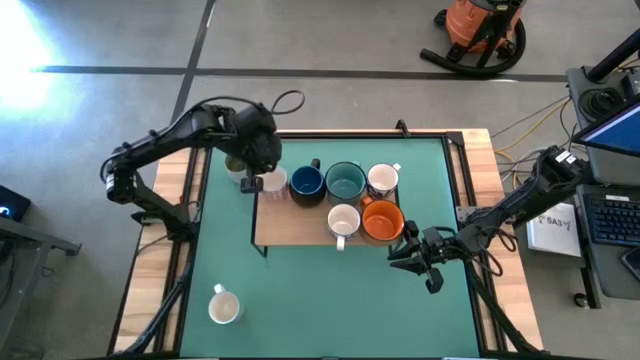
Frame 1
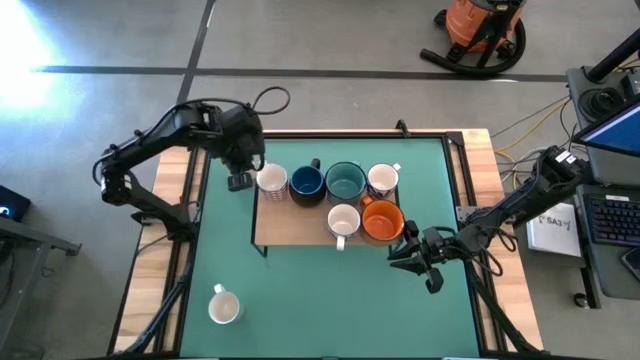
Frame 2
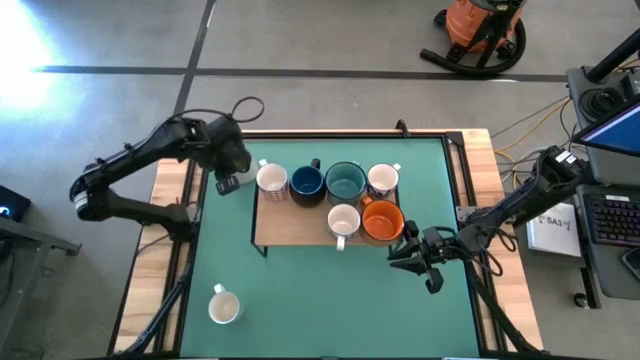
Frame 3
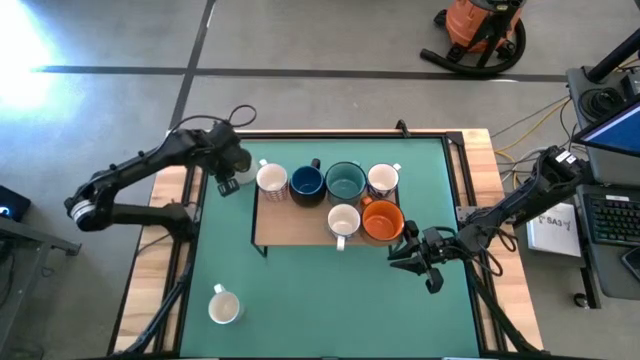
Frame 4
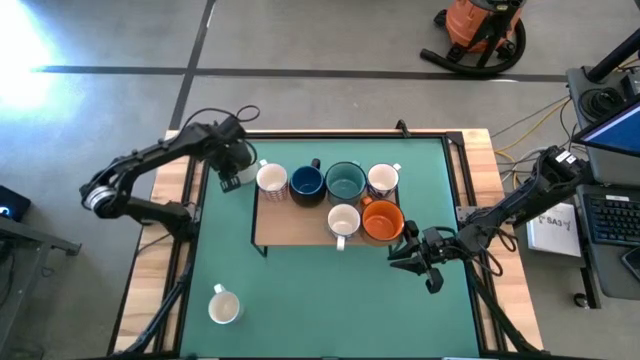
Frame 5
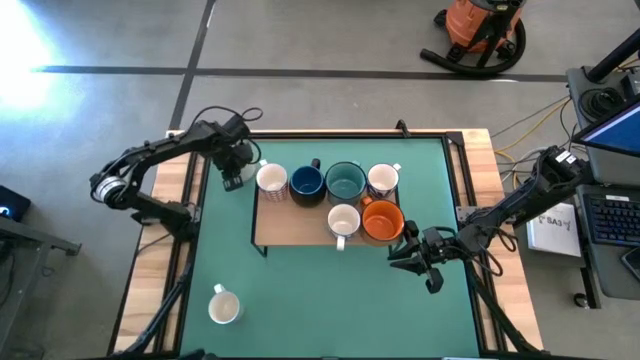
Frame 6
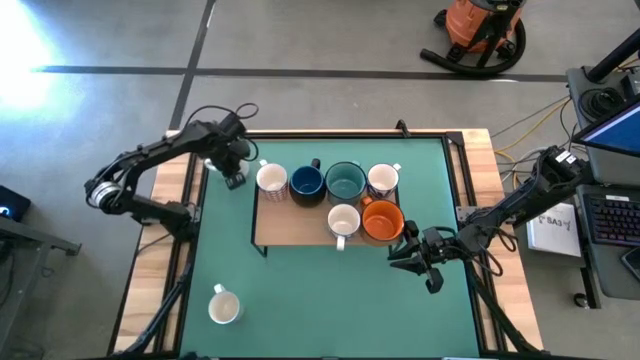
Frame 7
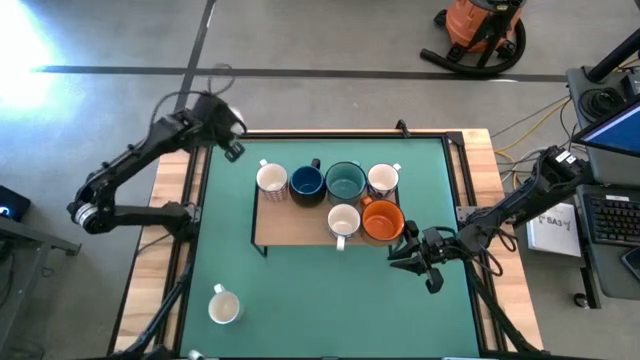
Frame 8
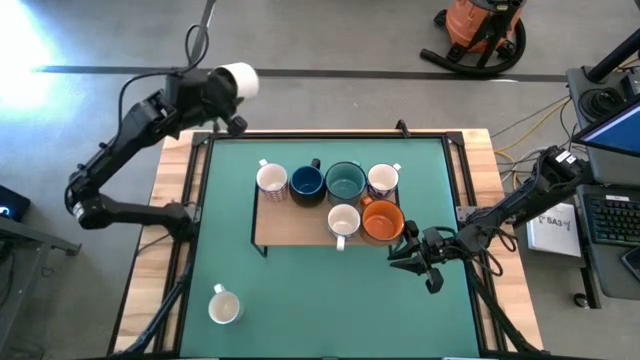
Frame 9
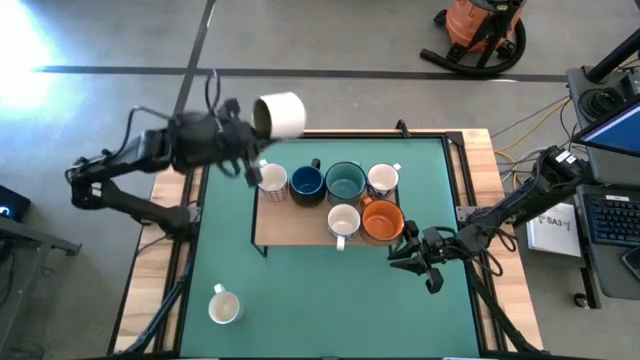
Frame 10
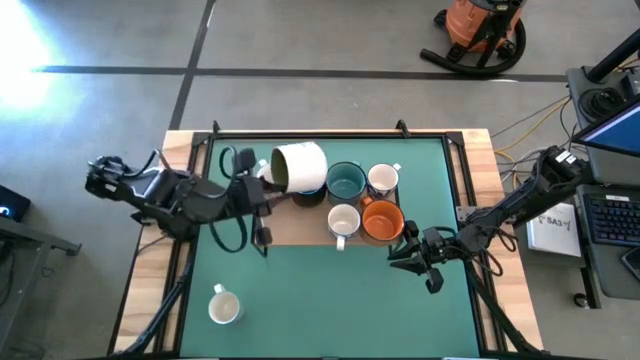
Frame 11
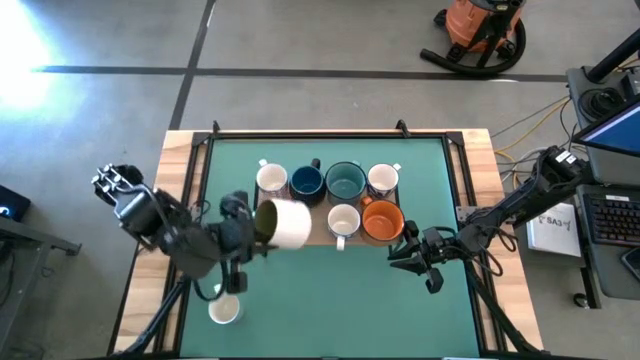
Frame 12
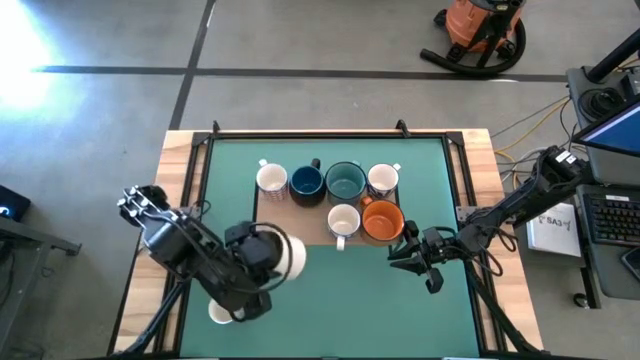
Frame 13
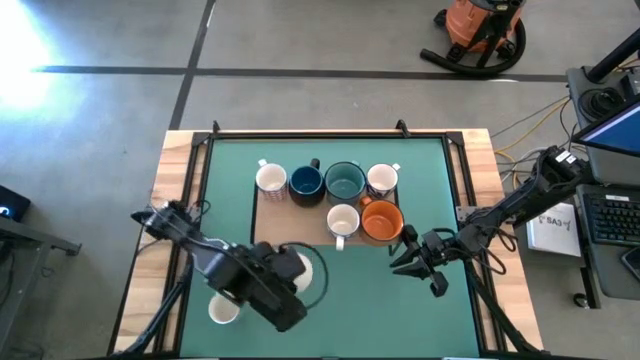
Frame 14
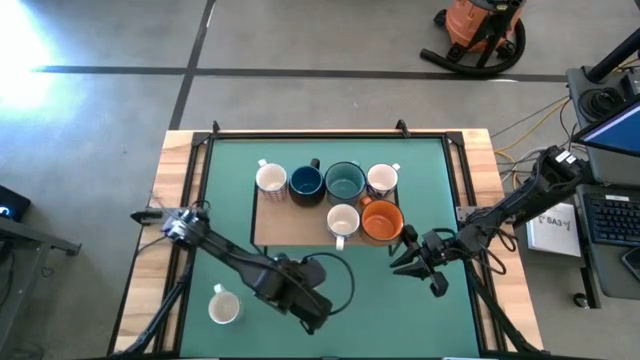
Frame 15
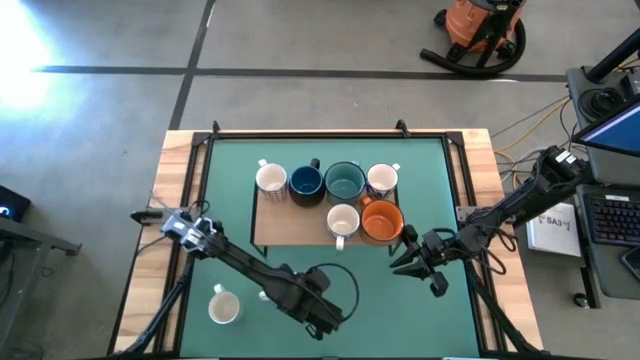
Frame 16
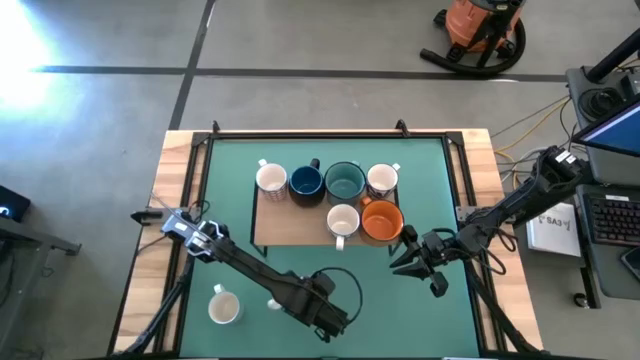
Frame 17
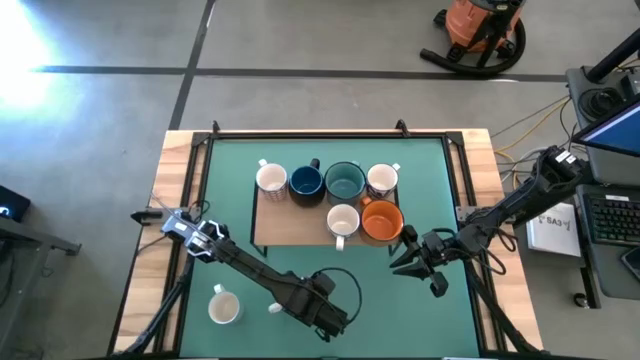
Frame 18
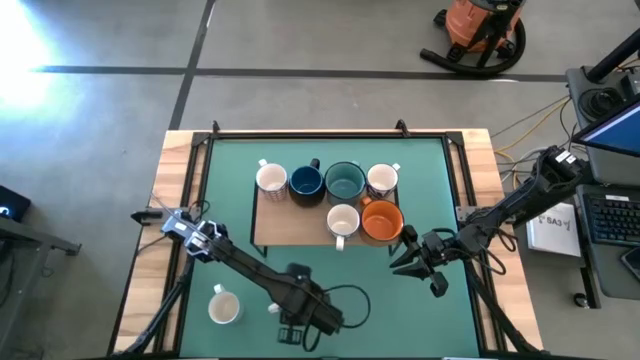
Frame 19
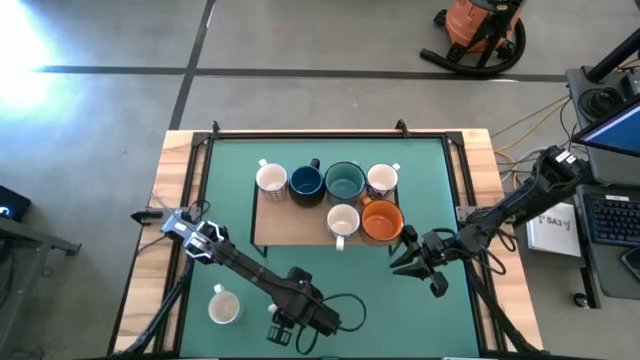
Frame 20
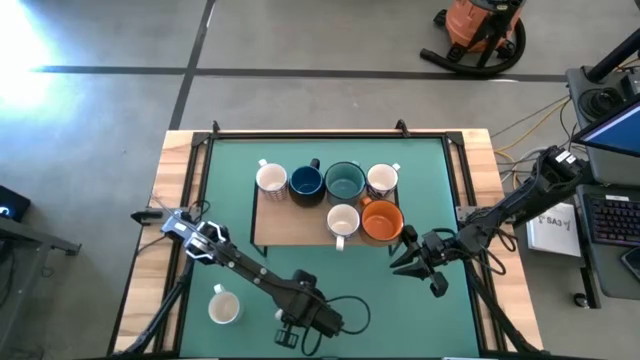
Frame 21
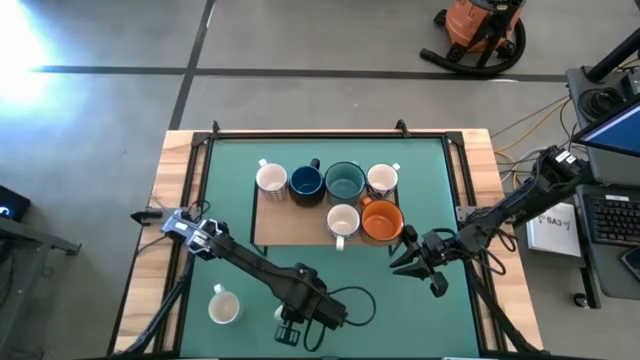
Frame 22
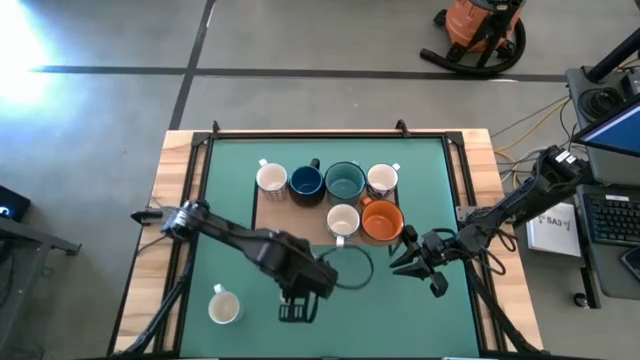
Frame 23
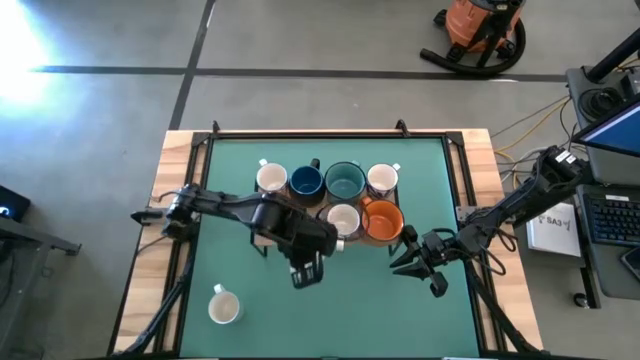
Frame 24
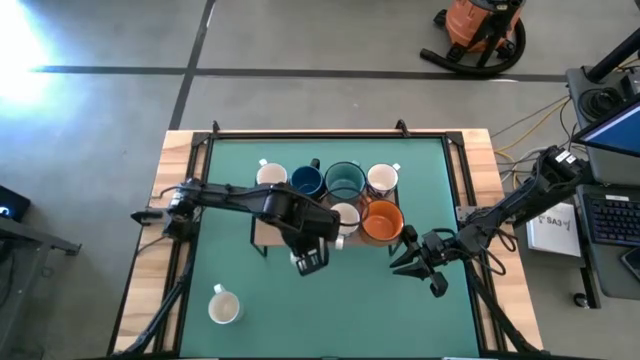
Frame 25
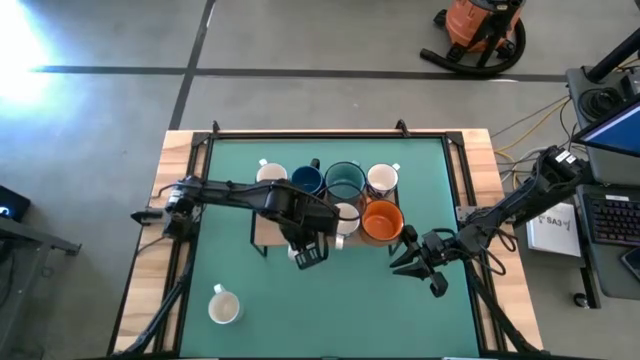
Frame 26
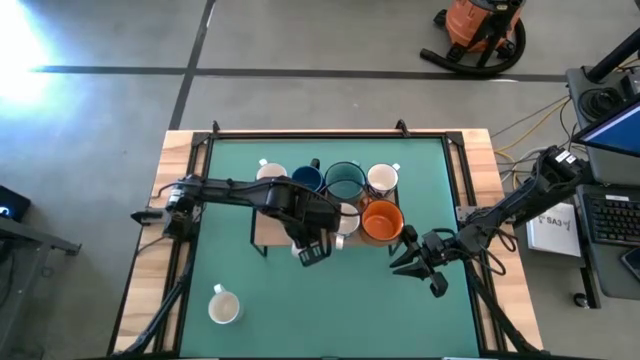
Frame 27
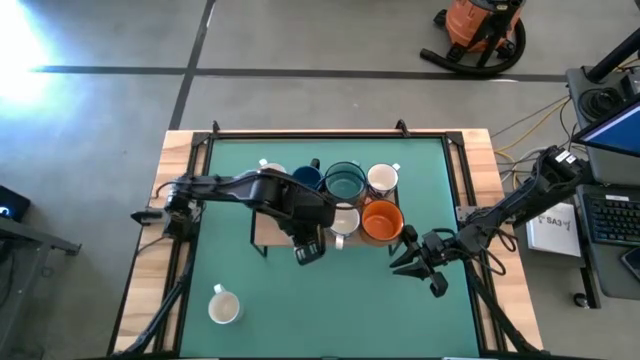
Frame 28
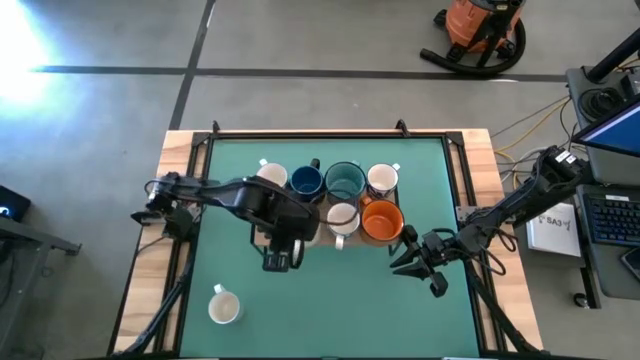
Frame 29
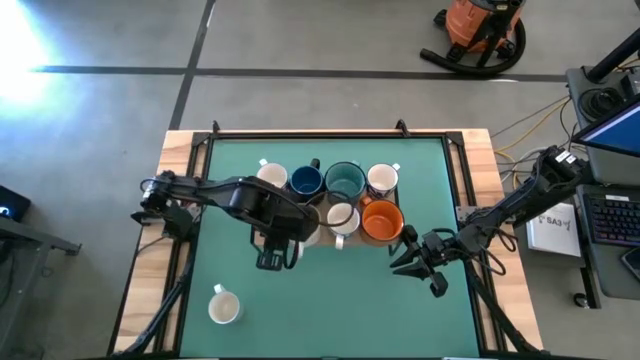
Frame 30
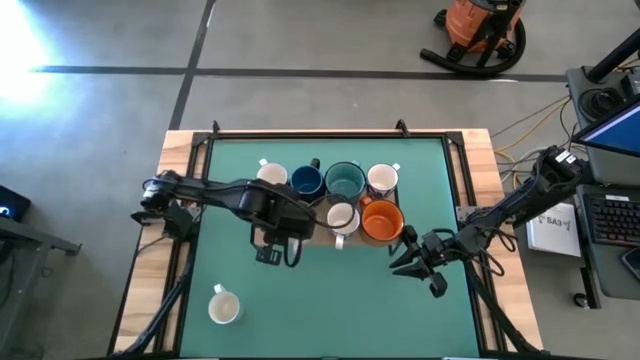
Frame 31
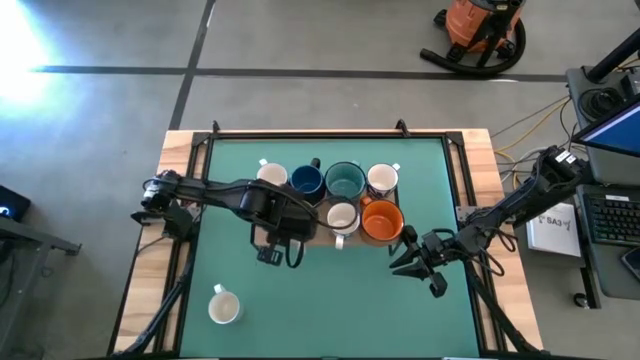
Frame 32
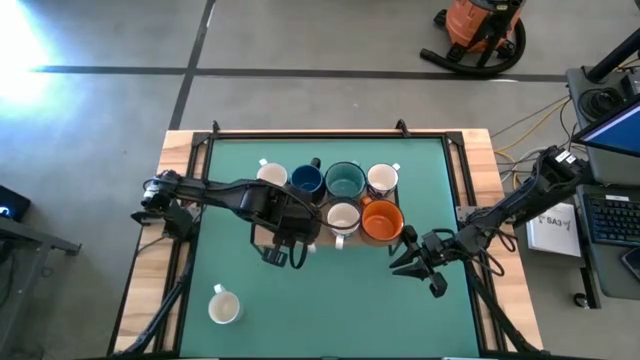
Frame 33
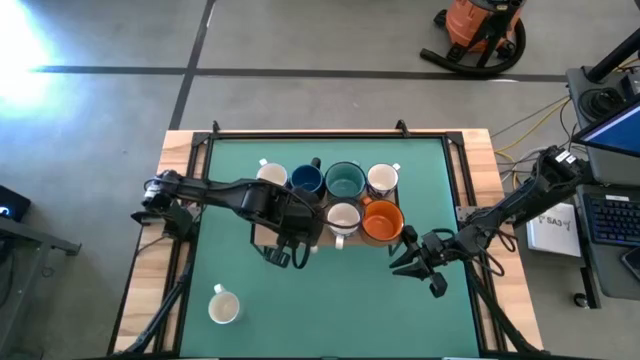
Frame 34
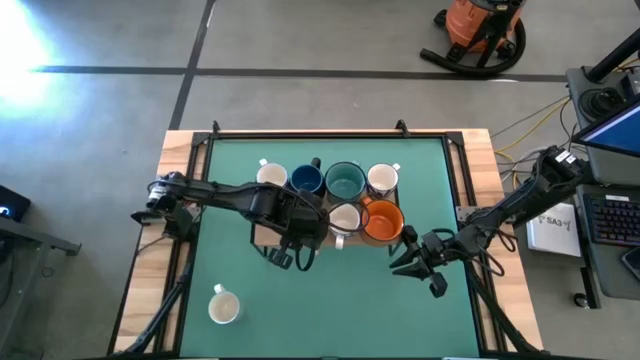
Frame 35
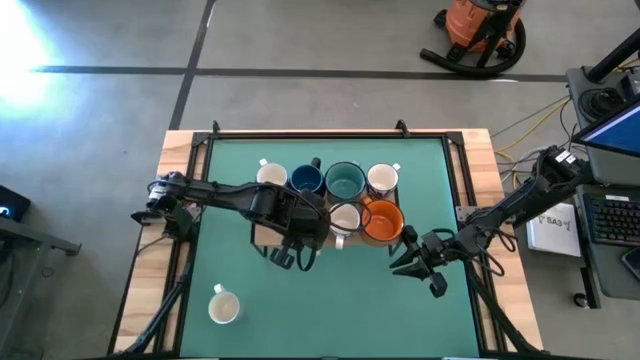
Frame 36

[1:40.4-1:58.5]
Task: Place coffee mugs
Put the white green mug on the shelf

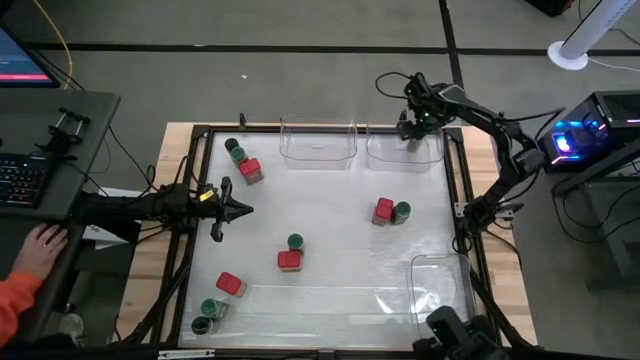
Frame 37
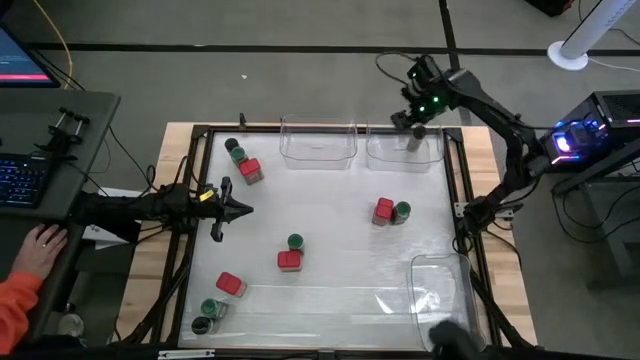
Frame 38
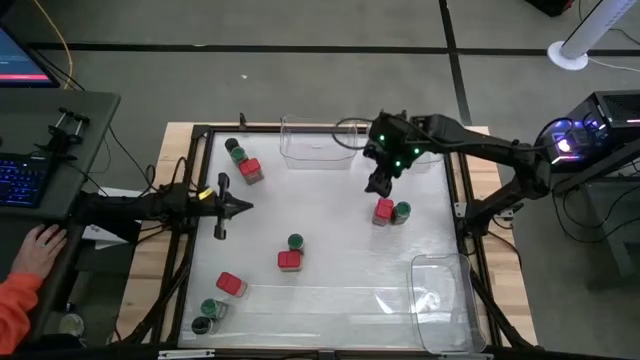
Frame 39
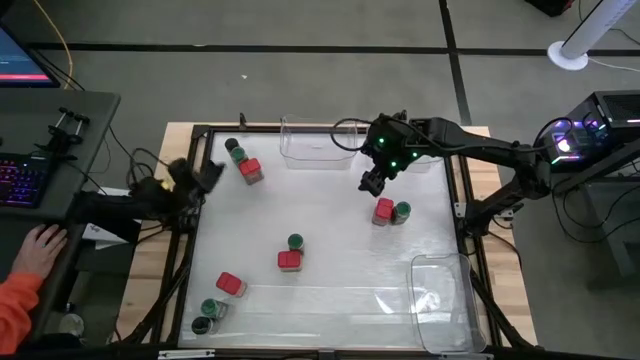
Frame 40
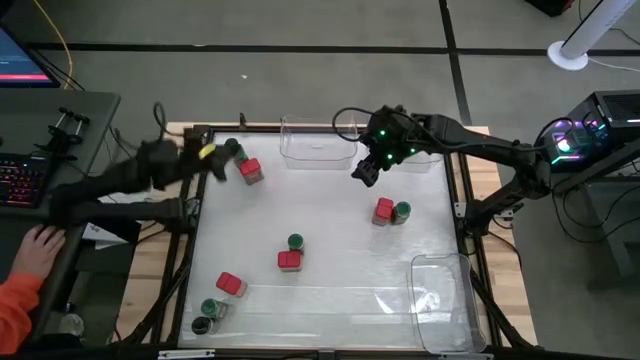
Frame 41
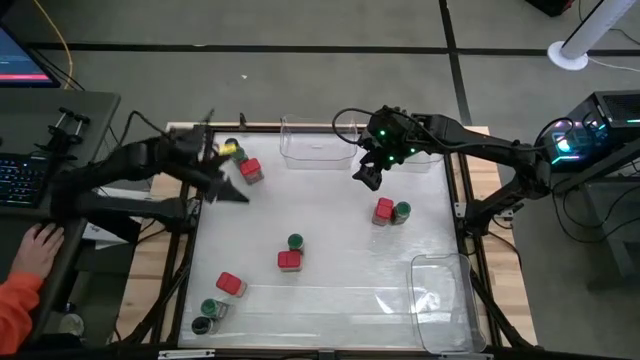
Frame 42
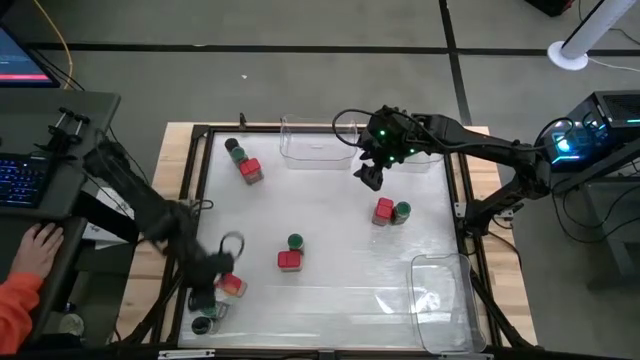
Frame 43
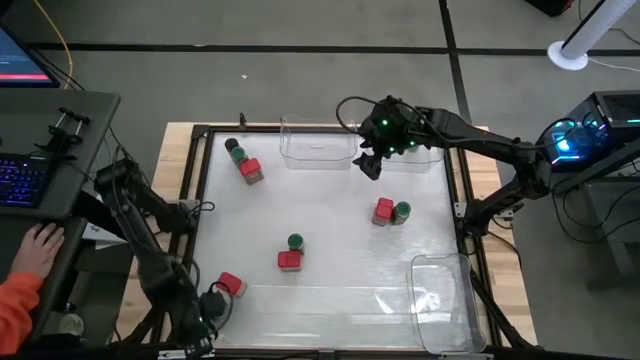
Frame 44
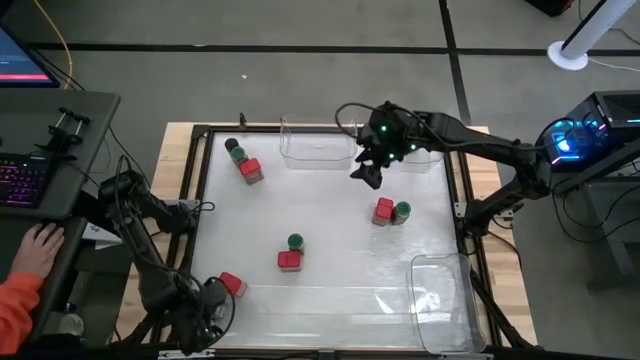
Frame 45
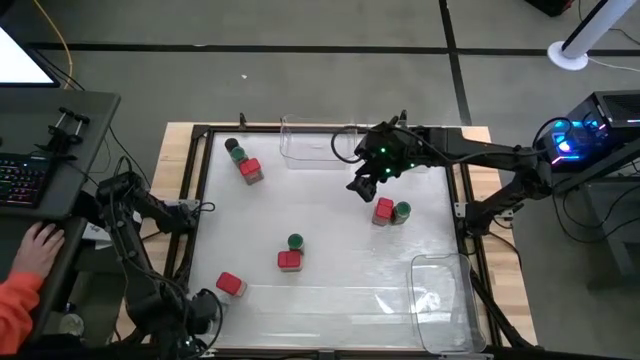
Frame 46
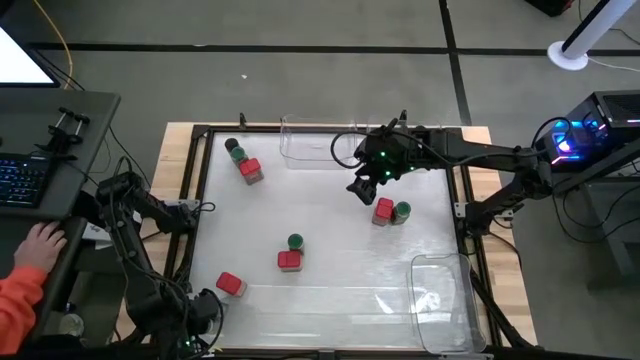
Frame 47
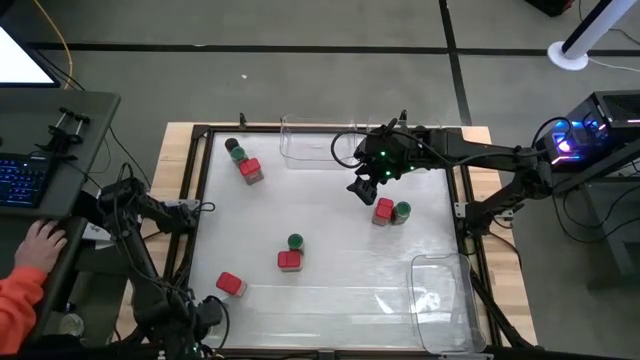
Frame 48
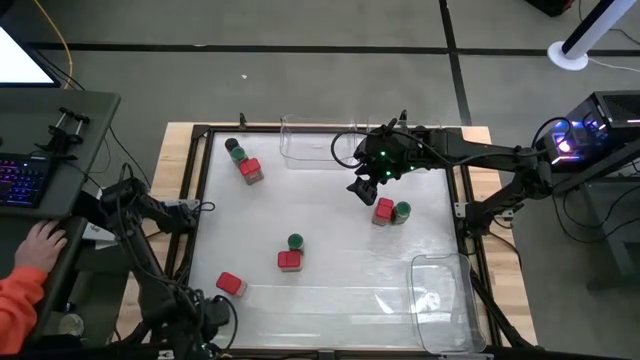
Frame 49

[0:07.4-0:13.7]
Task: Sort spices by type
Put the black seasoning bottle into the top right transparent bin
